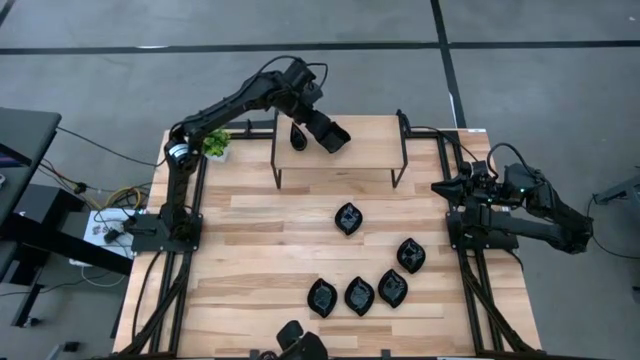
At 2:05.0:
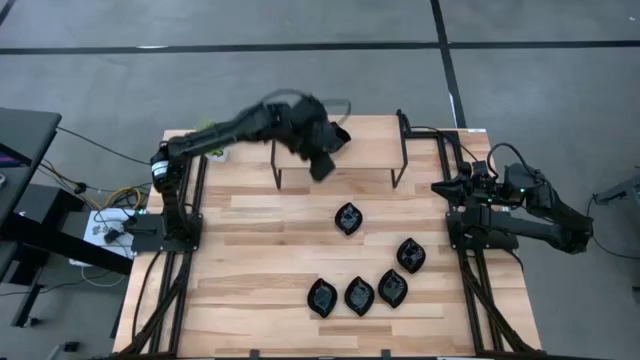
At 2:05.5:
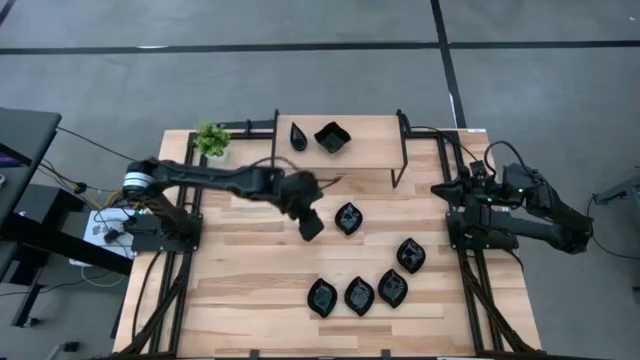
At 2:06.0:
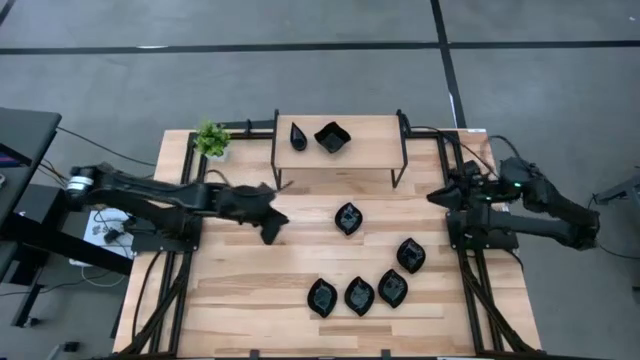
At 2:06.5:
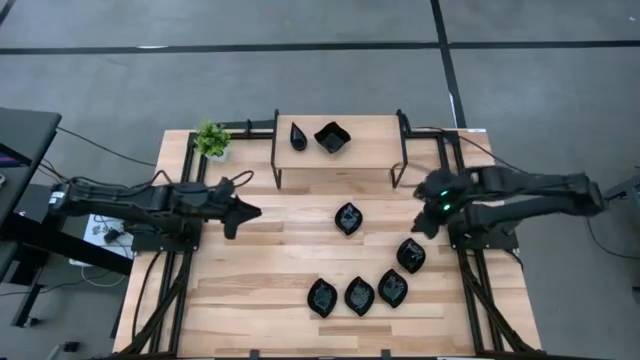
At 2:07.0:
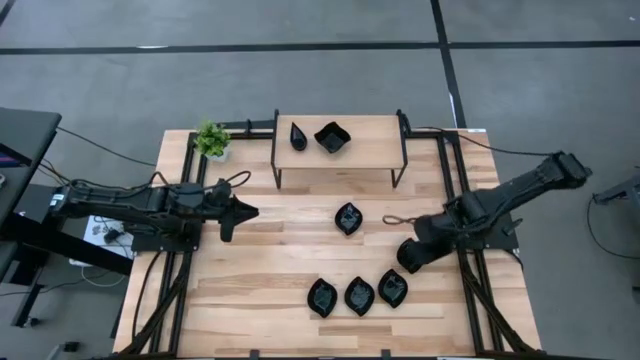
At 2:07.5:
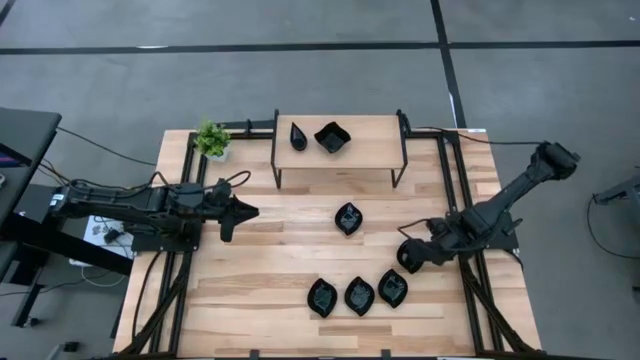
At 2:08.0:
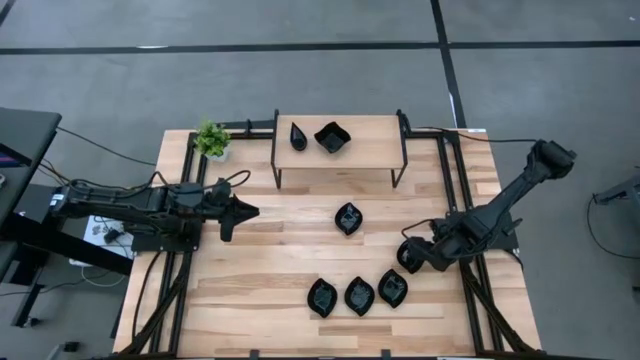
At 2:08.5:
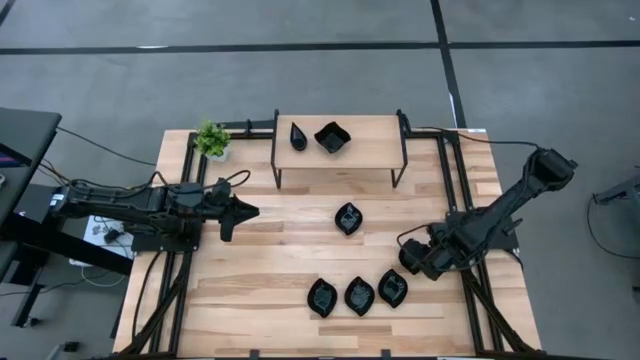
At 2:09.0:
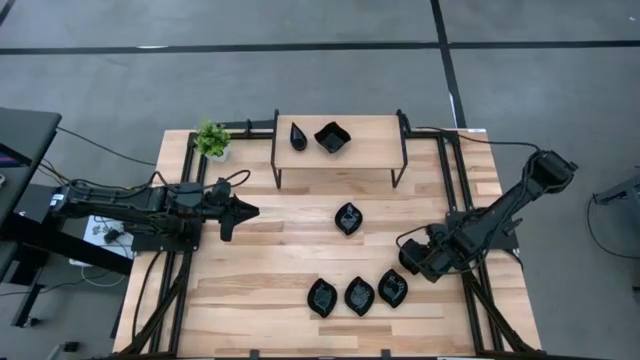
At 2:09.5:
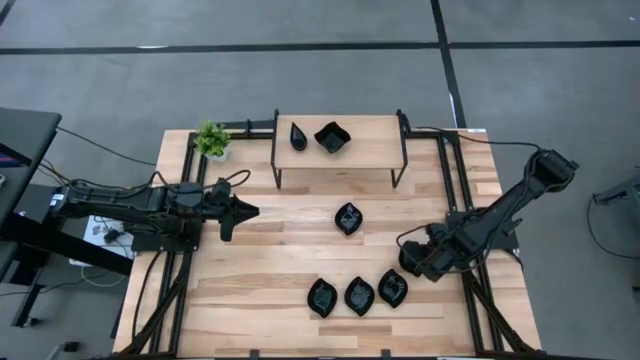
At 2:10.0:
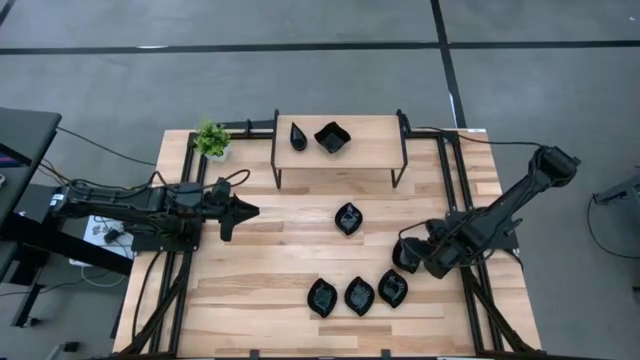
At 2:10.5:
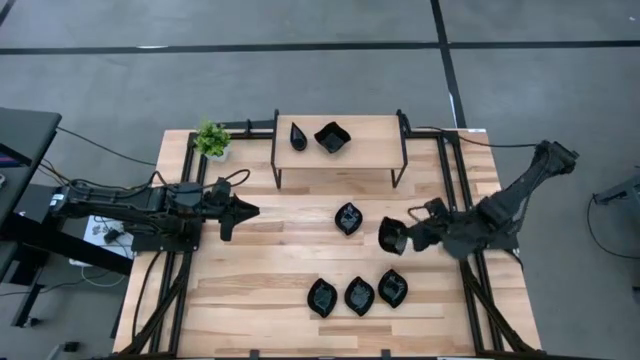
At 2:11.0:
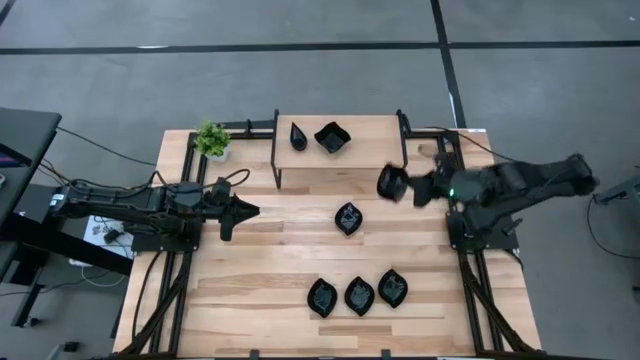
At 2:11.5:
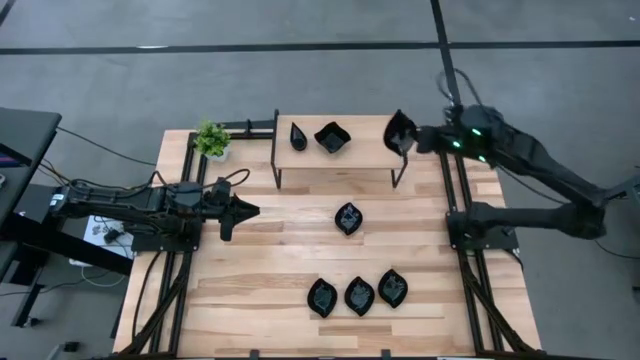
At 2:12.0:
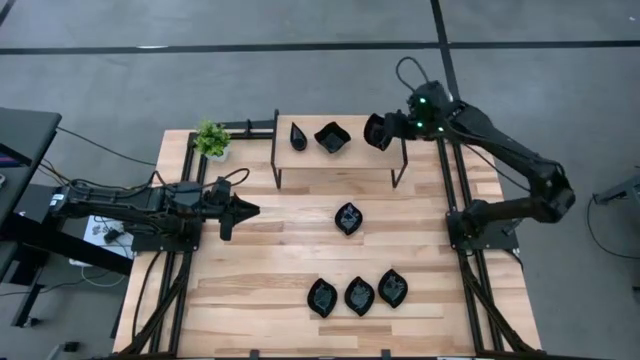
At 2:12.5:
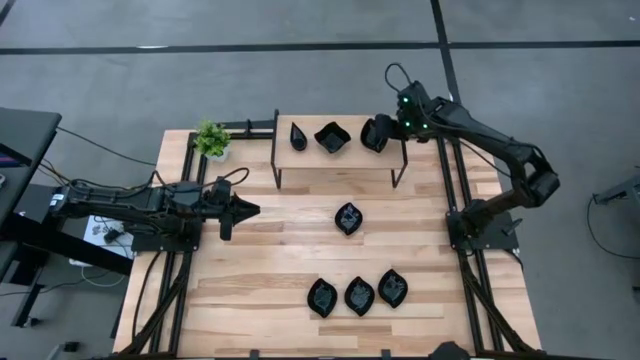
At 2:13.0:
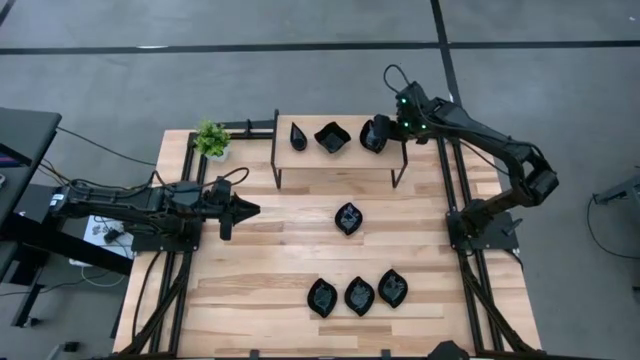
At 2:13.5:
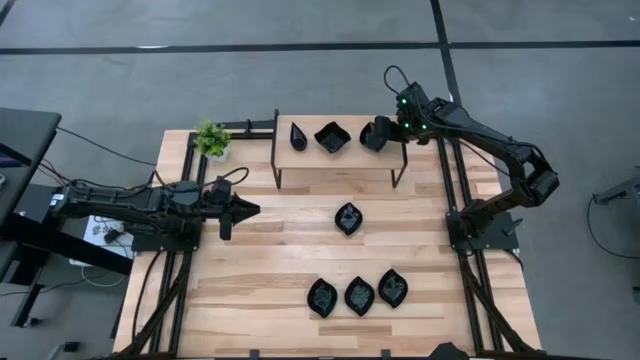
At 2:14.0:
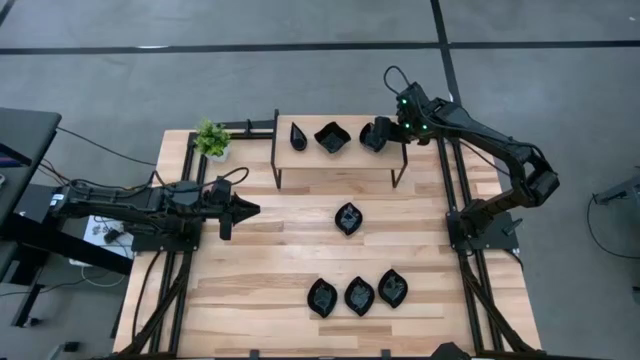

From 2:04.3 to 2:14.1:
Task: Pick & Place Mini shaped plates
Put the leaf shaped plate on the shelf

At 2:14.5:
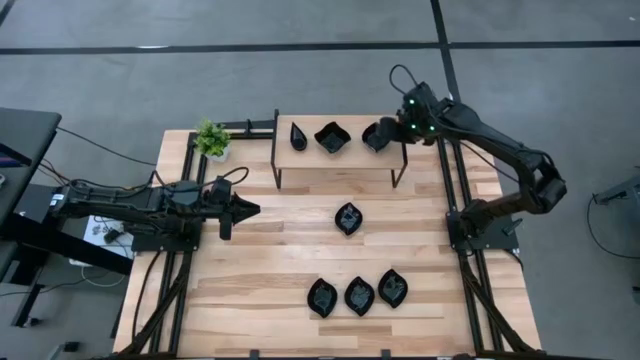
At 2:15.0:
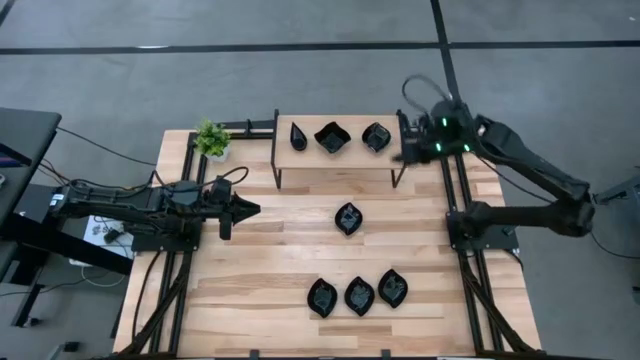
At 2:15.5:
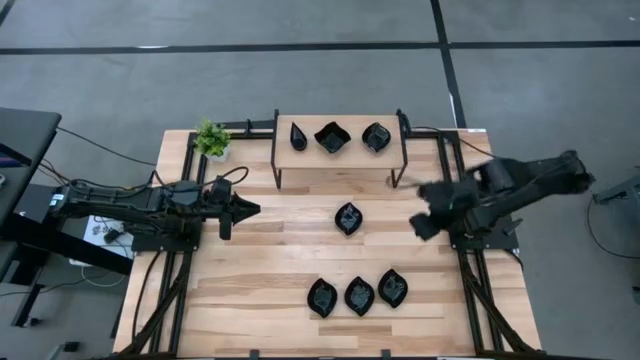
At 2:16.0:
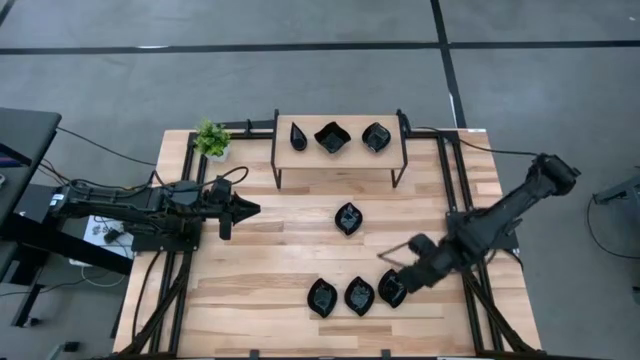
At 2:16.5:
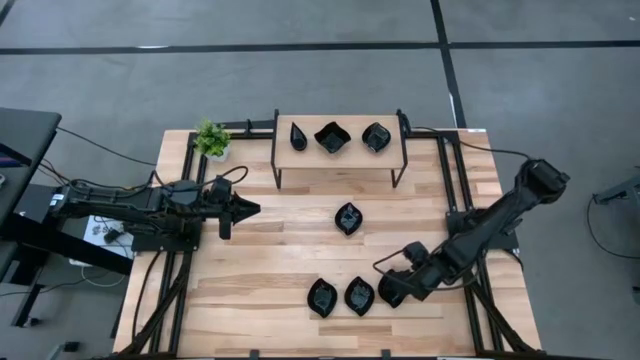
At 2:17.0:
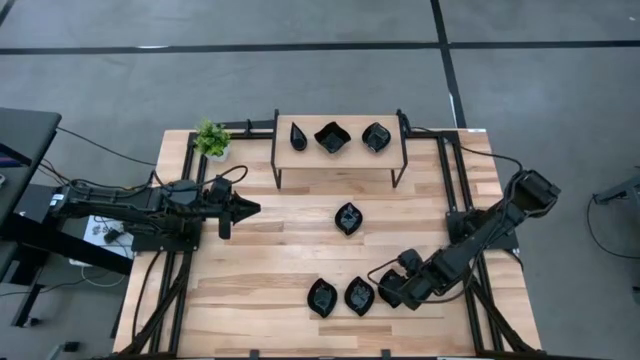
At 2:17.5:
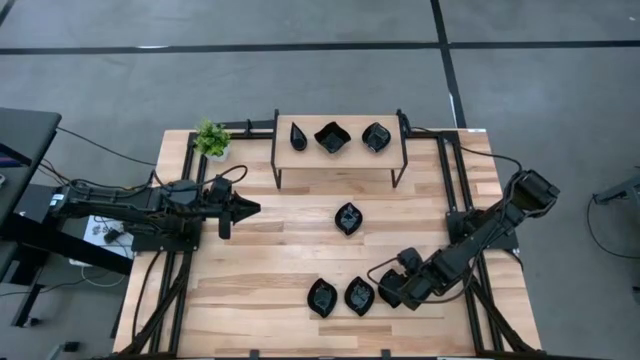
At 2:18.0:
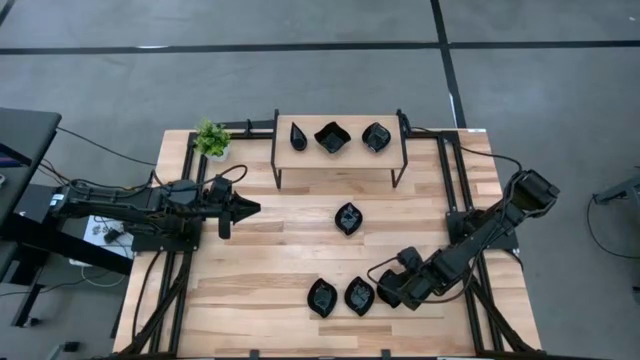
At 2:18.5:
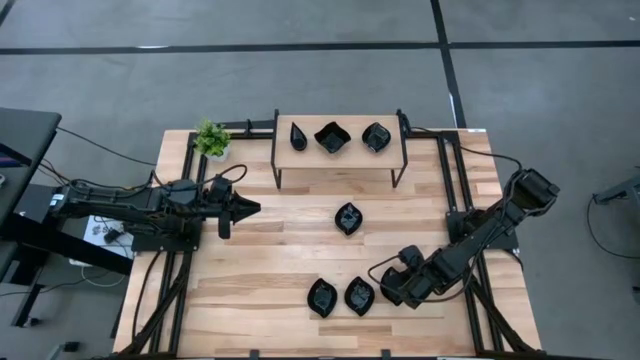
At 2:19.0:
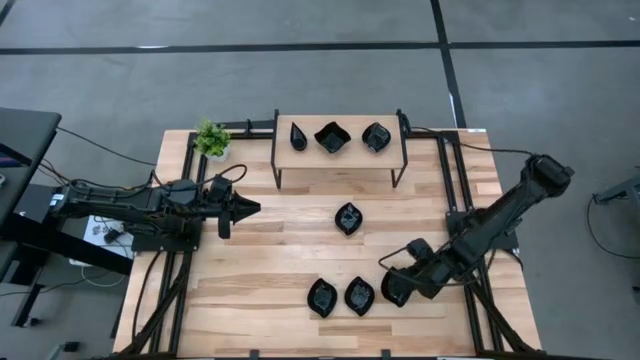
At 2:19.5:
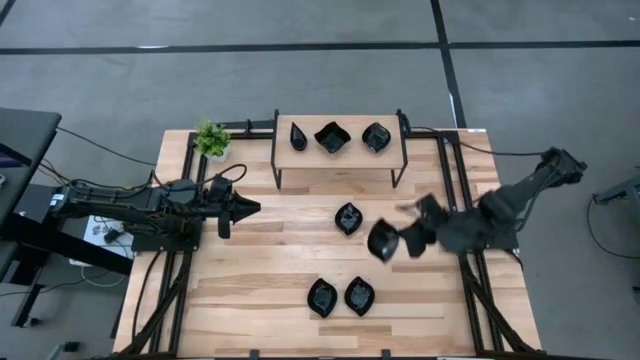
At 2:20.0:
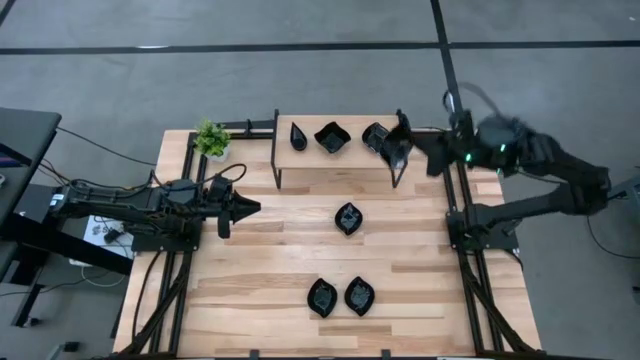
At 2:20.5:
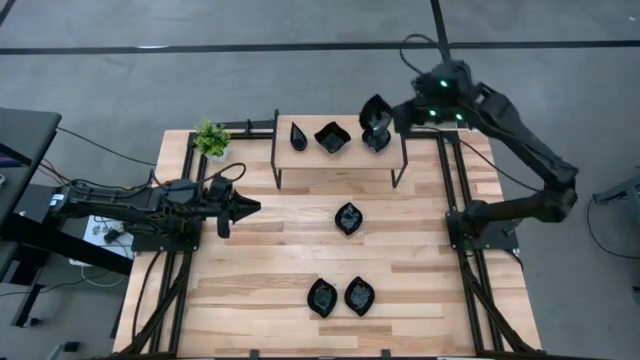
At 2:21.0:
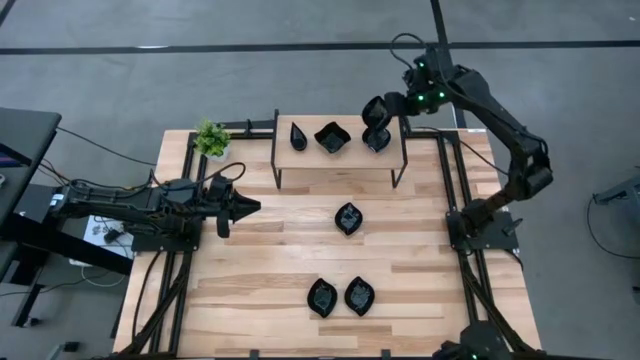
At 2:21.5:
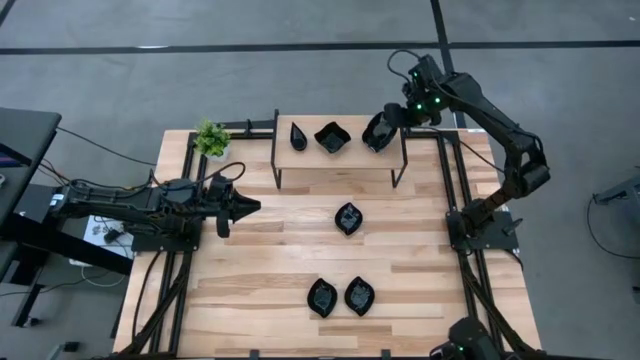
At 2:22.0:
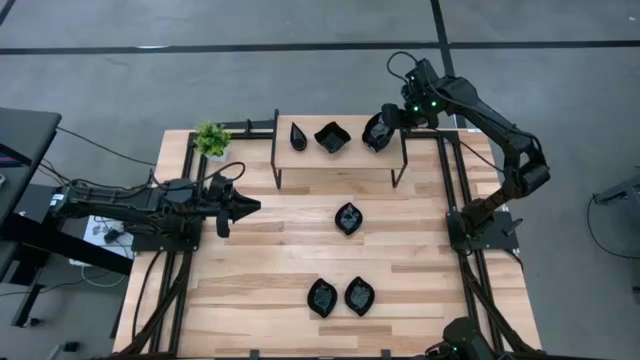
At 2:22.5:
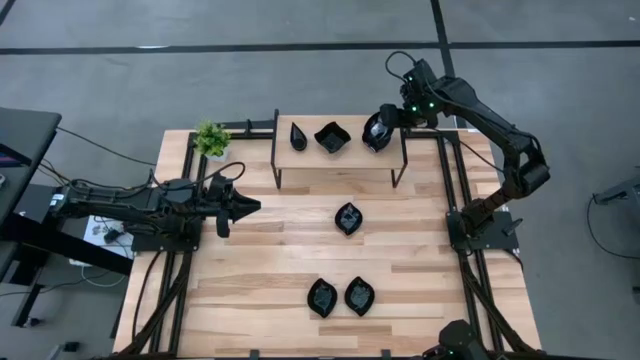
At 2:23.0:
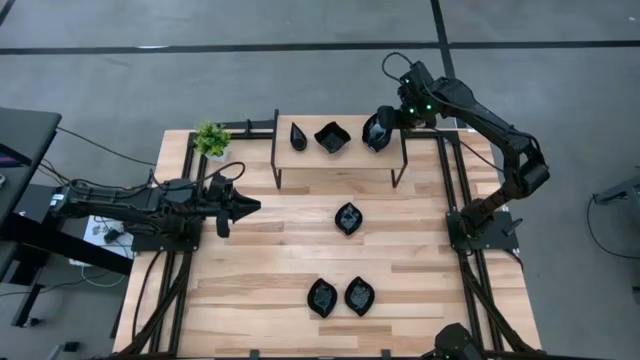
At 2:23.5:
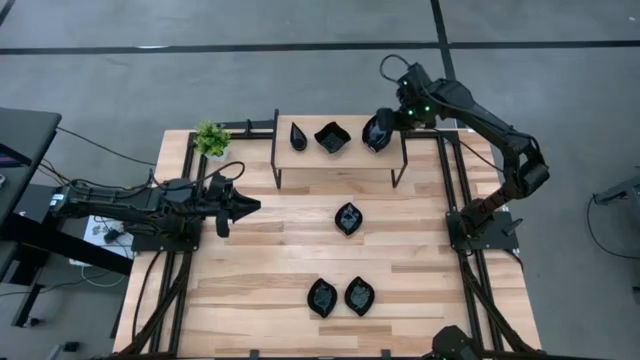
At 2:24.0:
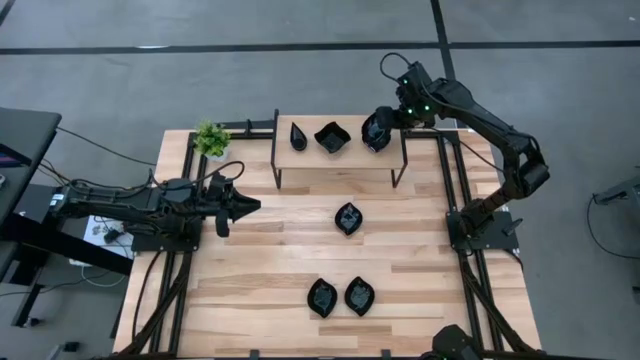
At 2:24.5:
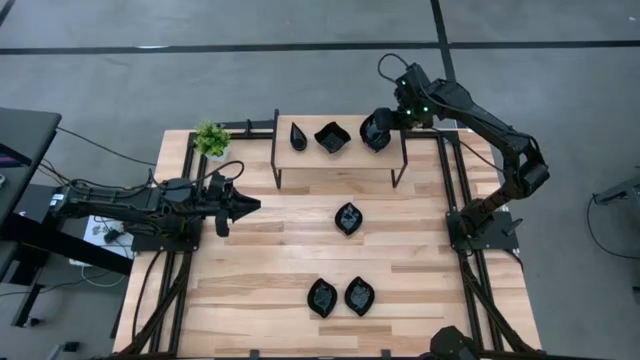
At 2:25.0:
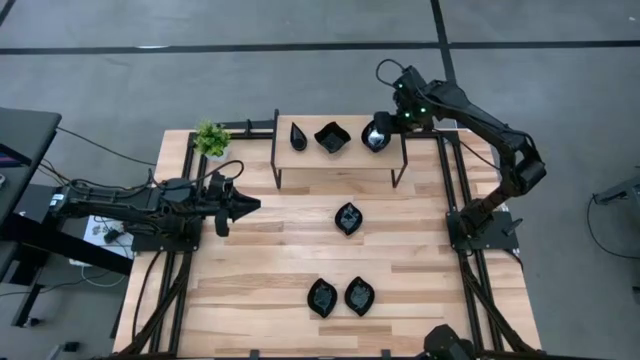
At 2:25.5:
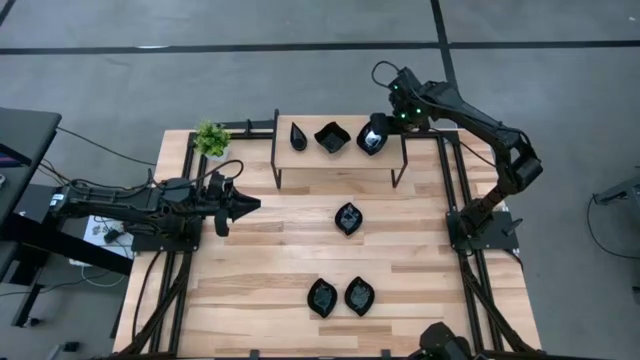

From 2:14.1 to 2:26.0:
Stack the leaf shaped plate on top of the leaf shaped plate on the shelf
